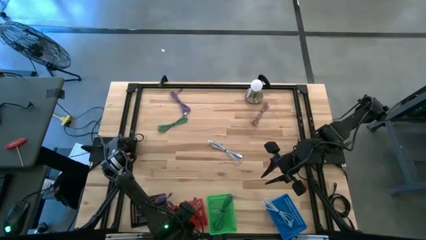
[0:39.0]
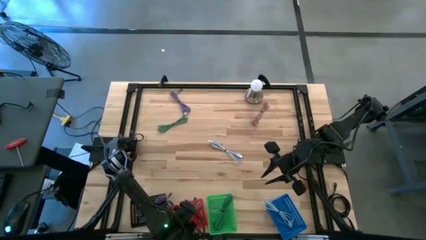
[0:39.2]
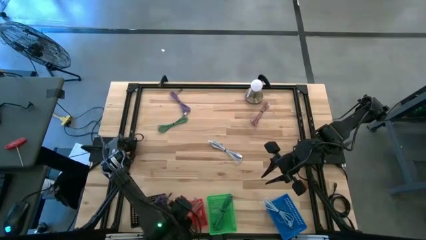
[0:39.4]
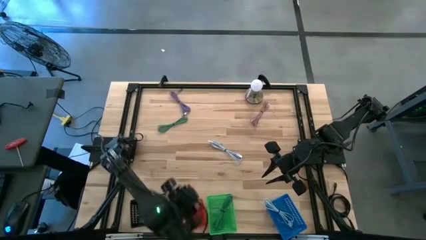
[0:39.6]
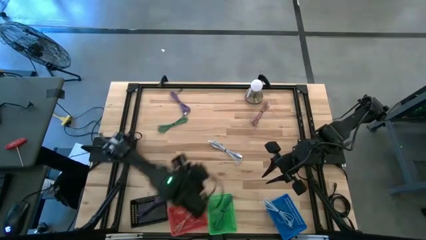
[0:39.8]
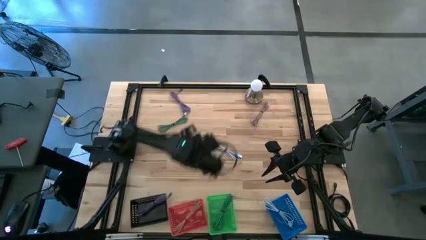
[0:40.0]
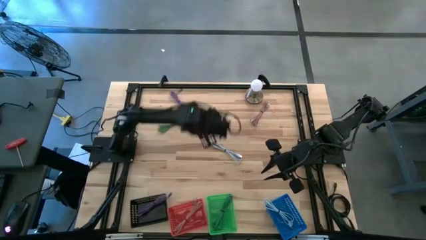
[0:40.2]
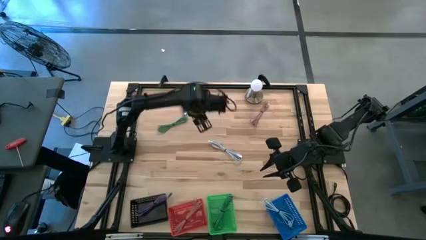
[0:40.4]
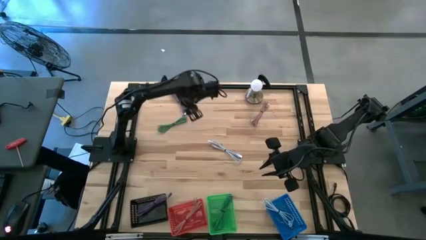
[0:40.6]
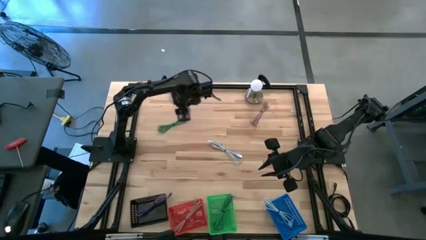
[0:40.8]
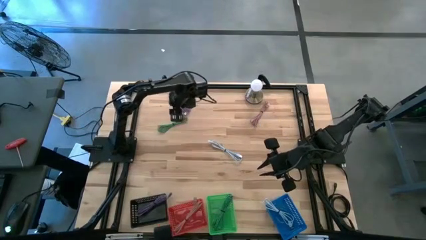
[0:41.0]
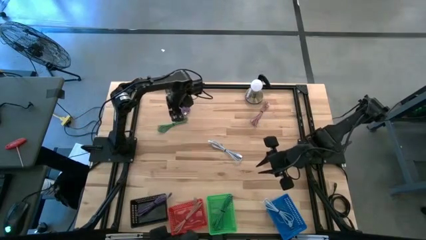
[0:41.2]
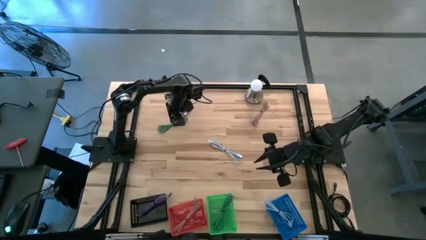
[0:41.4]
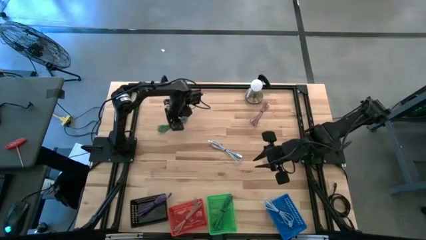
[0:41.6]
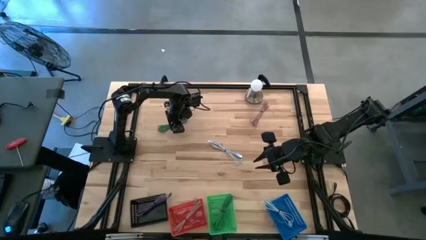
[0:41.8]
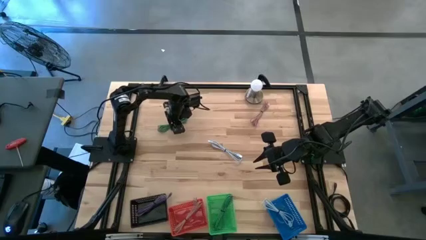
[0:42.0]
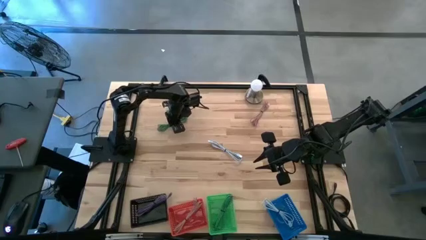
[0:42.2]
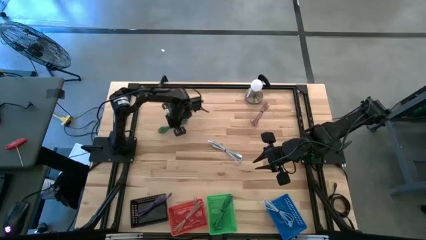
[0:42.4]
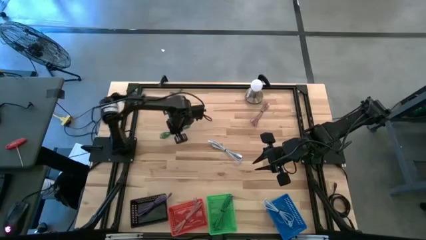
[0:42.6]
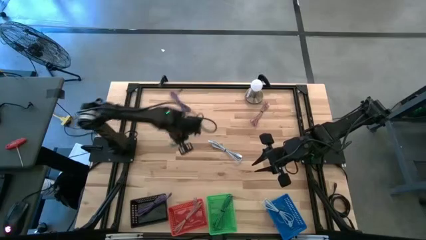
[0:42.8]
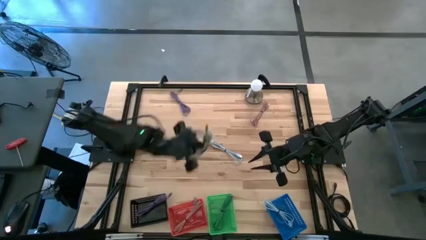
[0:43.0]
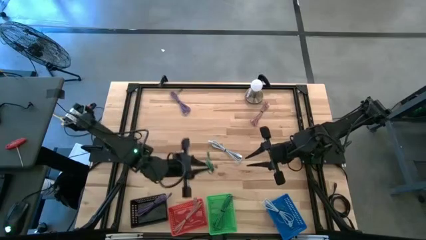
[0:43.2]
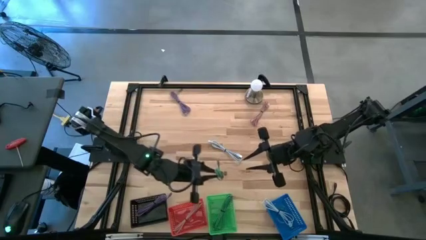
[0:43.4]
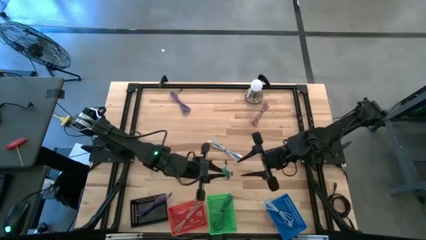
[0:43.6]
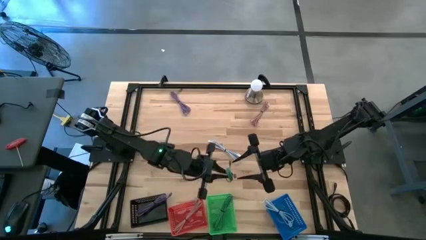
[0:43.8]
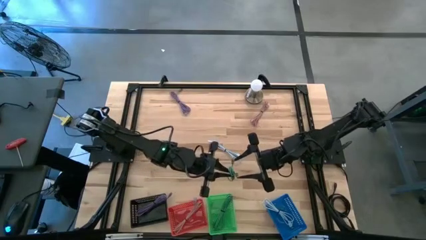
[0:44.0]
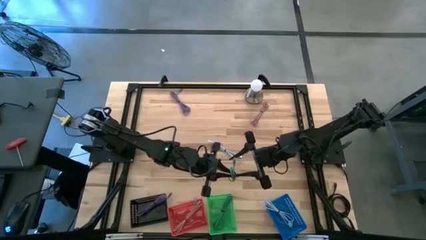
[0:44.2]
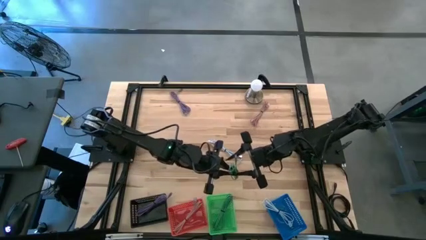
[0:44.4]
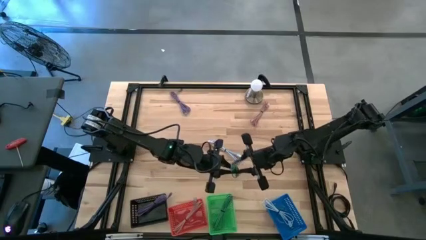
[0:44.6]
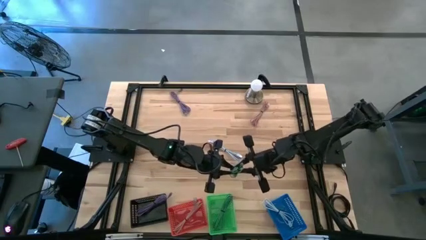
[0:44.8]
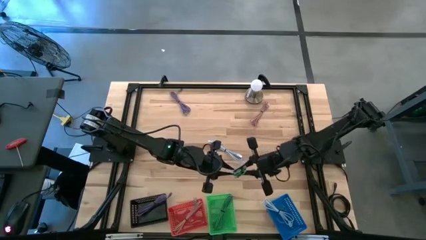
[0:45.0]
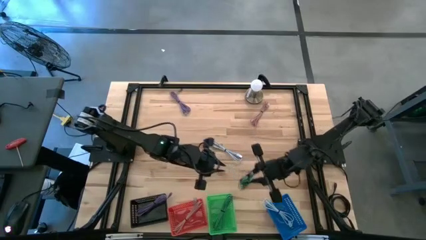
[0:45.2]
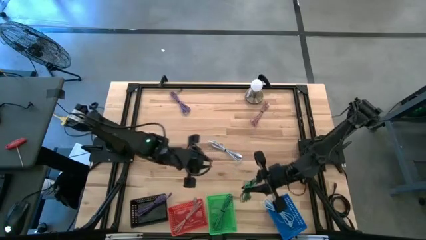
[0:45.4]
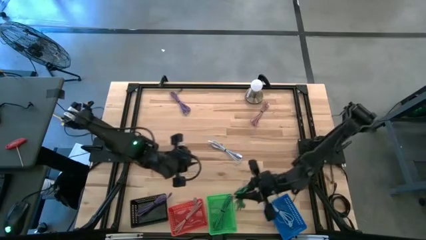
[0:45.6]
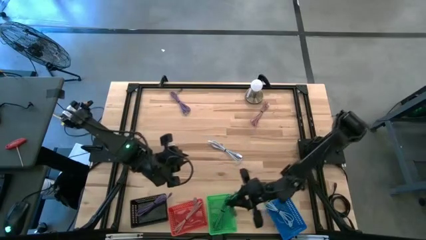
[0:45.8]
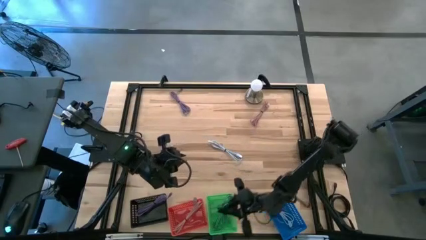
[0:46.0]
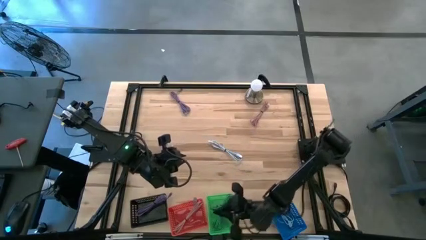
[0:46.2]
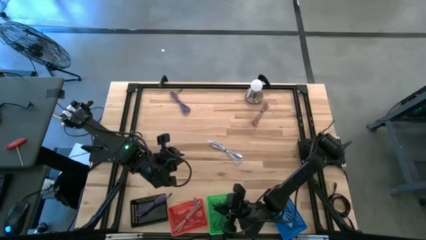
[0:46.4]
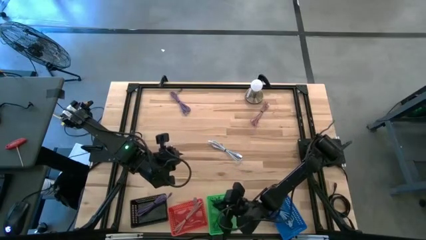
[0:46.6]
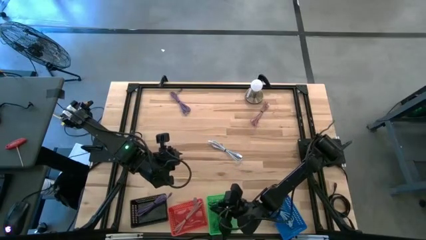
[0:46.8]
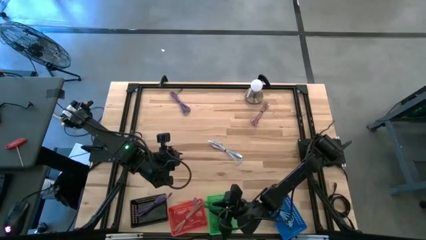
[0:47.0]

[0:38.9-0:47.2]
Task: Pick & Place USB Port
Put the green charger cable into the green bin

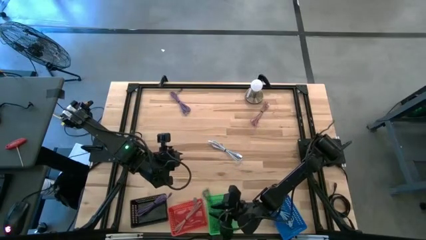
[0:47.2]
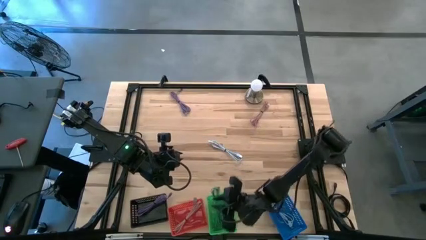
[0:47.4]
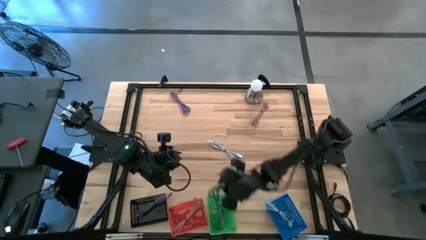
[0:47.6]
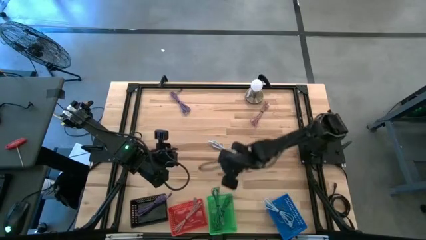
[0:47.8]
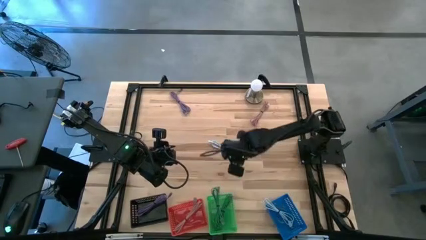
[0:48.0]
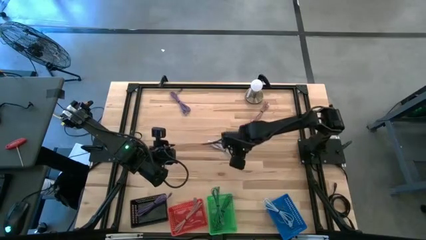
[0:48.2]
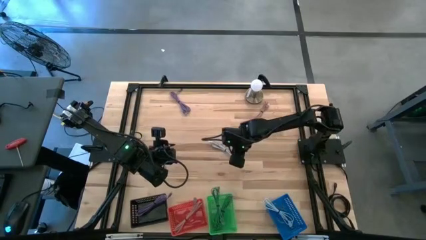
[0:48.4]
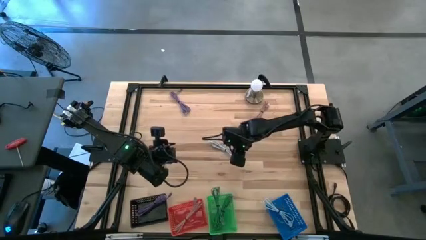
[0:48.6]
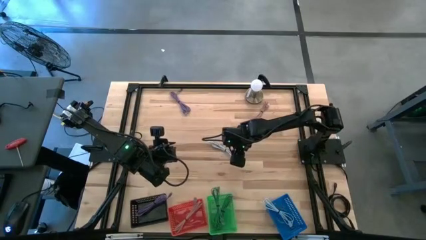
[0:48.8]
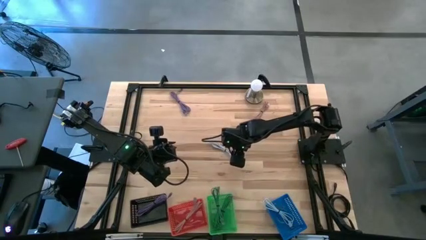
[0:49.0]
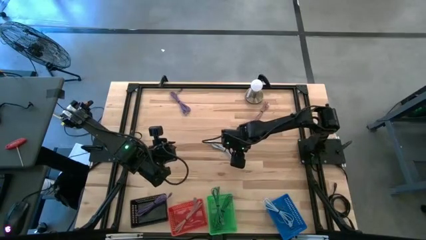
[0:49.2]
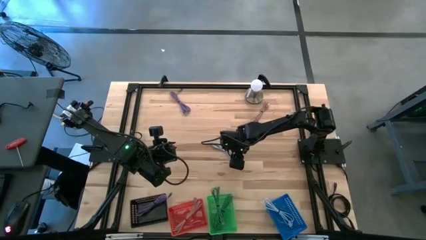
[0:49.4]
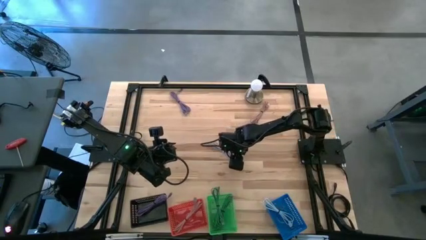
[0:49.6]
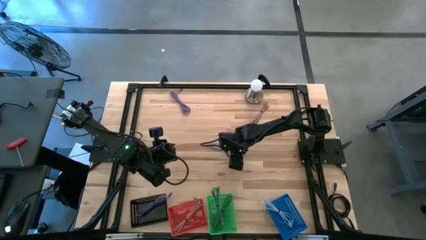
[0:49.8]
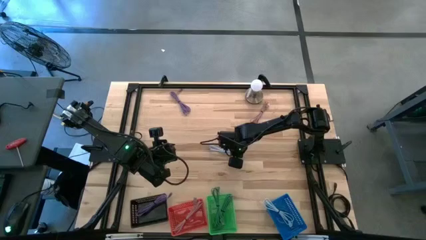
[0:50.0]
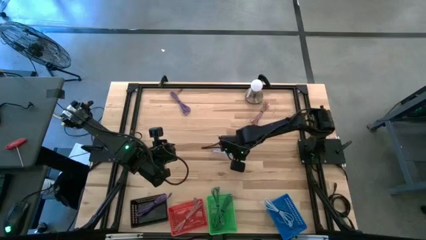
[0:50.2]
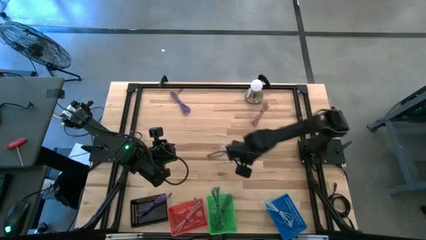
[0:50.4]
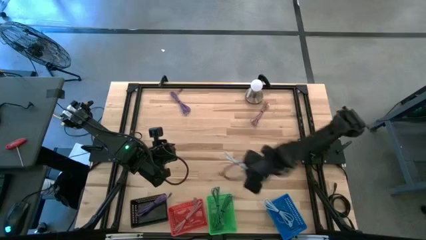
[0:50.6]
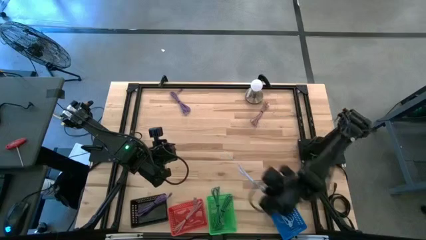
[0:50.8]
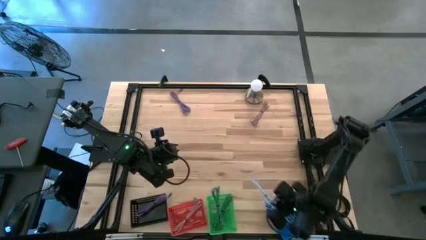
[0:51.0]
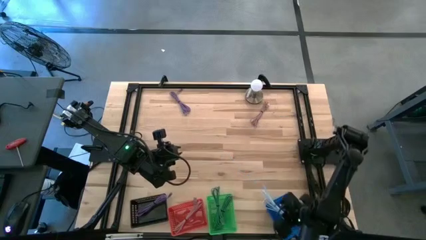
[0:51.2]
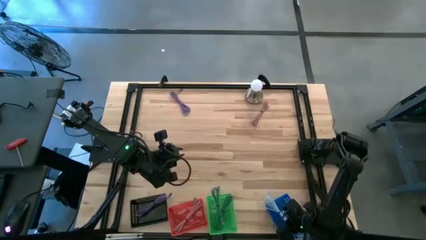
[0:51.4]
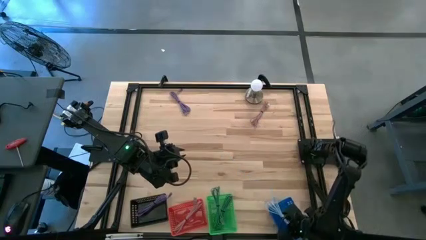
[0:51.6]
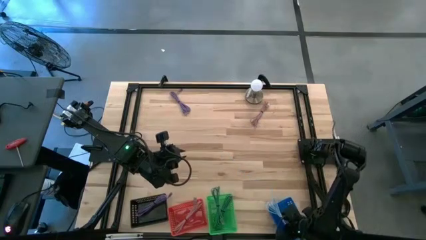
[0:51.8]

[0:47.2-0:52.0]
Put the light blue charger cable into the blue bin
